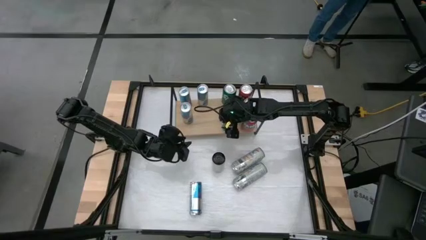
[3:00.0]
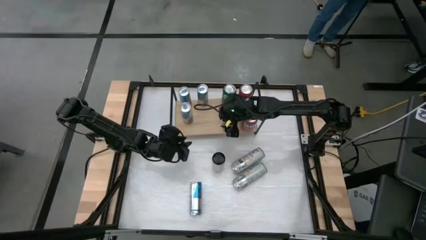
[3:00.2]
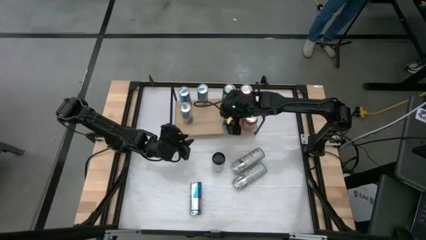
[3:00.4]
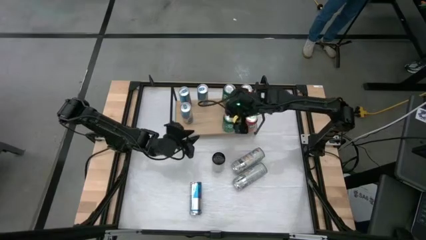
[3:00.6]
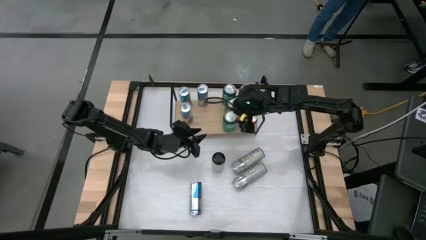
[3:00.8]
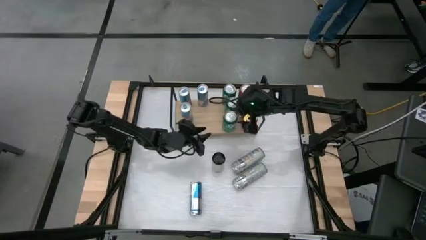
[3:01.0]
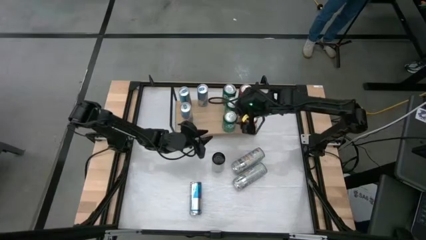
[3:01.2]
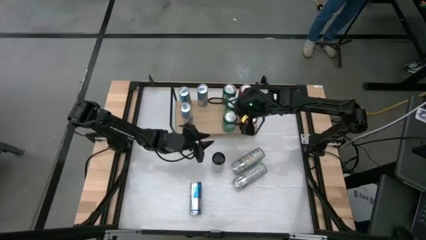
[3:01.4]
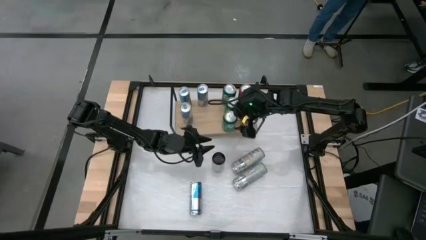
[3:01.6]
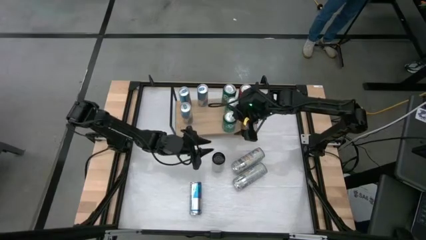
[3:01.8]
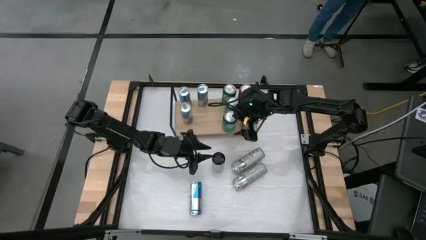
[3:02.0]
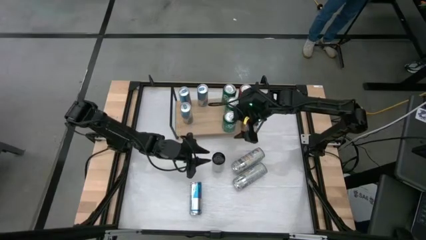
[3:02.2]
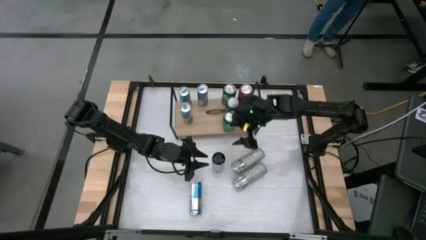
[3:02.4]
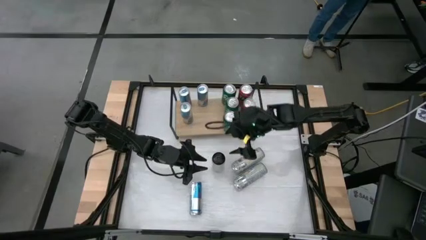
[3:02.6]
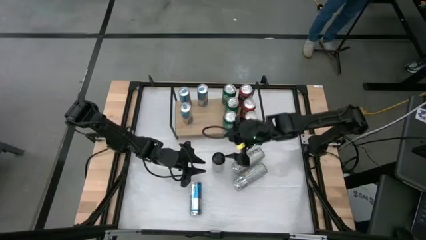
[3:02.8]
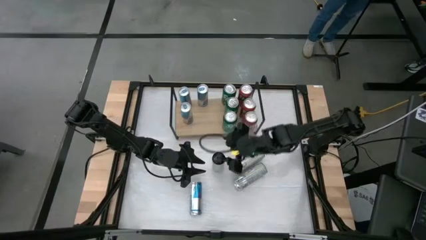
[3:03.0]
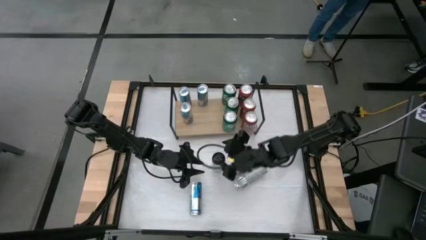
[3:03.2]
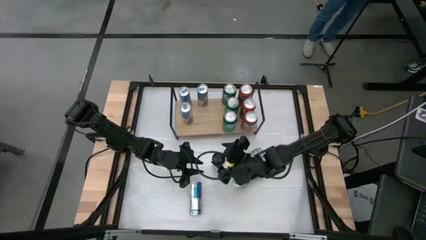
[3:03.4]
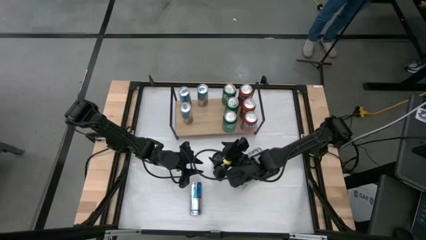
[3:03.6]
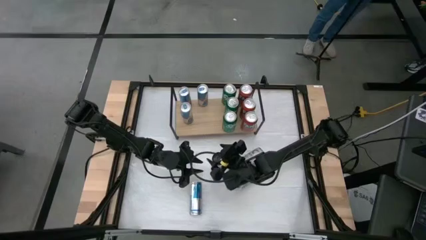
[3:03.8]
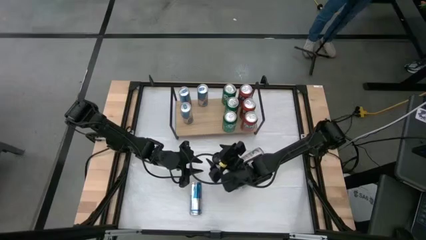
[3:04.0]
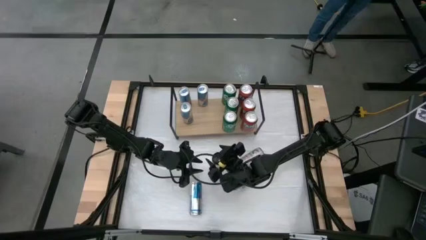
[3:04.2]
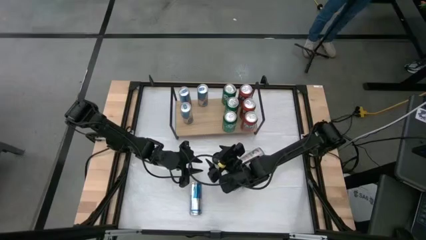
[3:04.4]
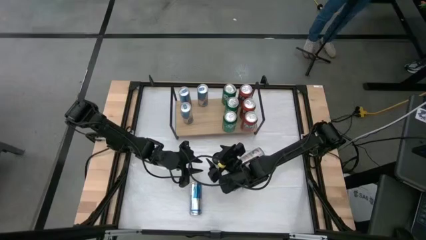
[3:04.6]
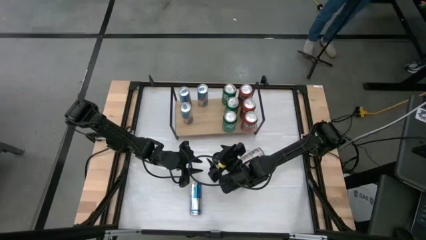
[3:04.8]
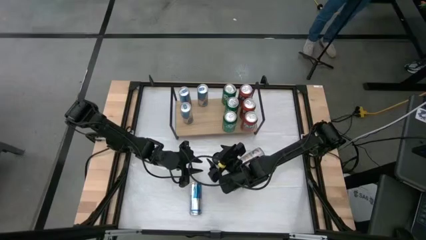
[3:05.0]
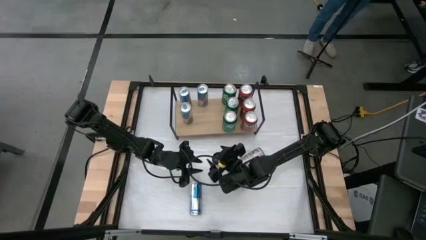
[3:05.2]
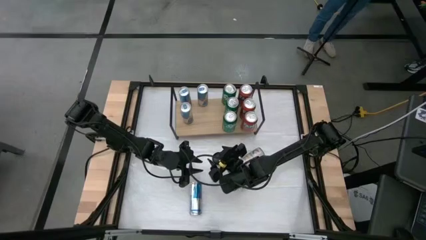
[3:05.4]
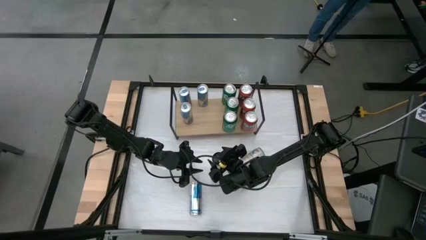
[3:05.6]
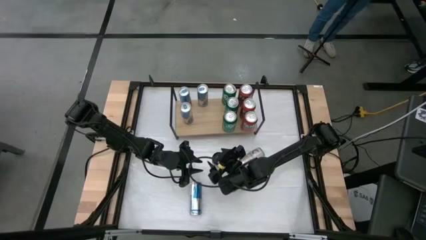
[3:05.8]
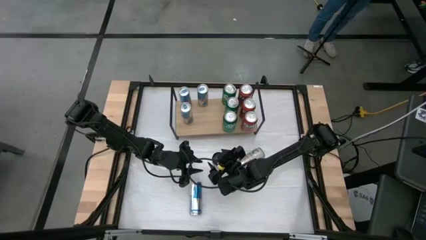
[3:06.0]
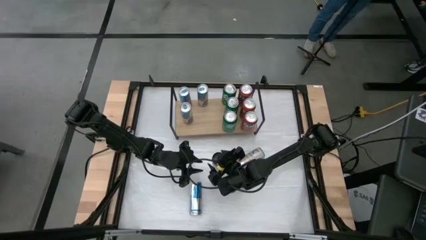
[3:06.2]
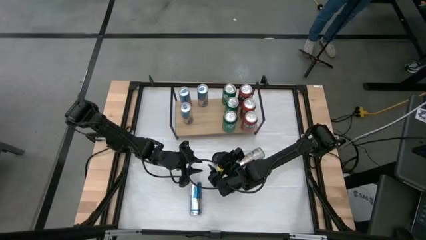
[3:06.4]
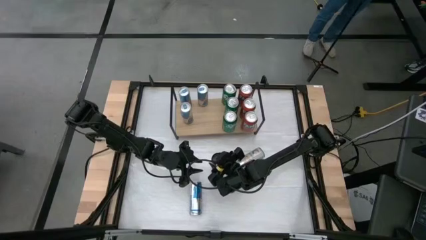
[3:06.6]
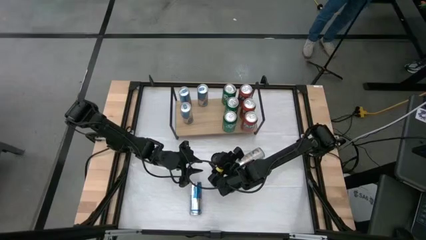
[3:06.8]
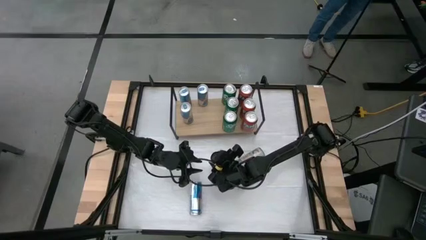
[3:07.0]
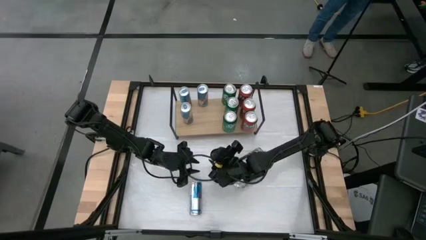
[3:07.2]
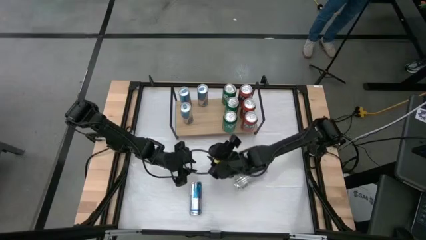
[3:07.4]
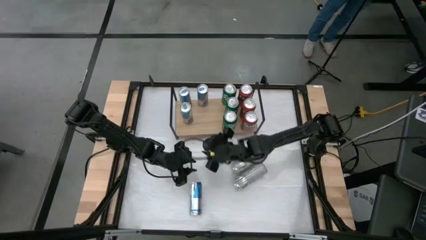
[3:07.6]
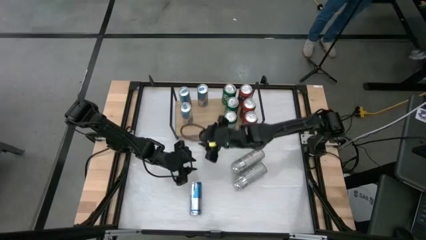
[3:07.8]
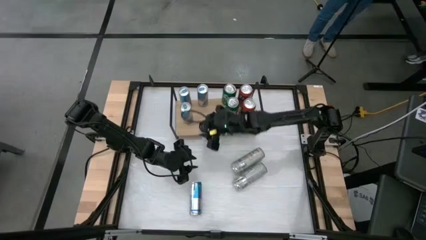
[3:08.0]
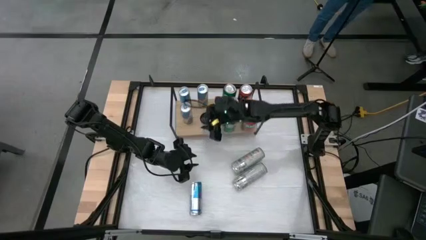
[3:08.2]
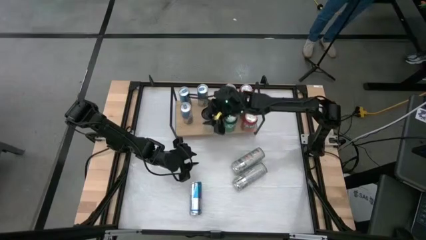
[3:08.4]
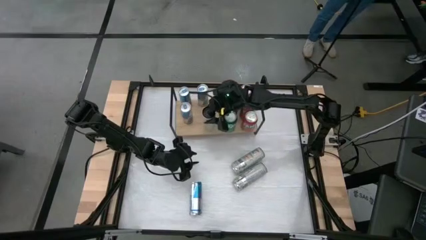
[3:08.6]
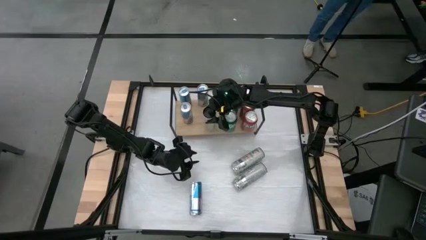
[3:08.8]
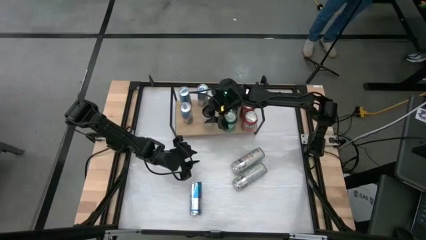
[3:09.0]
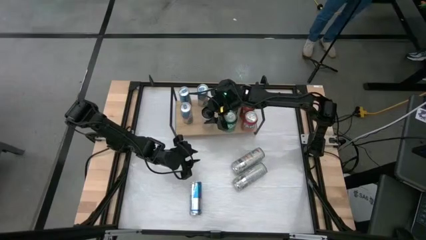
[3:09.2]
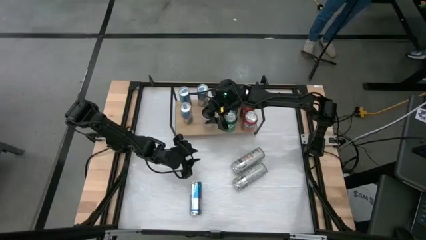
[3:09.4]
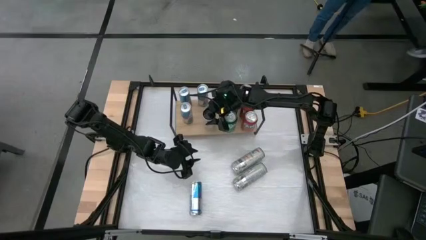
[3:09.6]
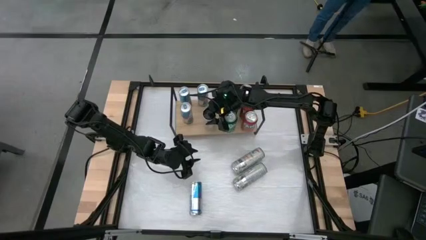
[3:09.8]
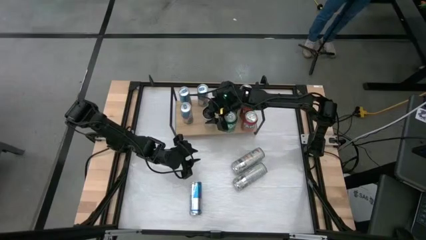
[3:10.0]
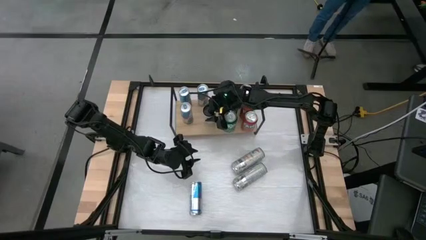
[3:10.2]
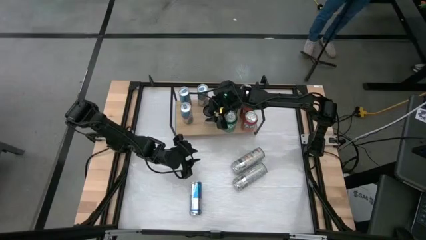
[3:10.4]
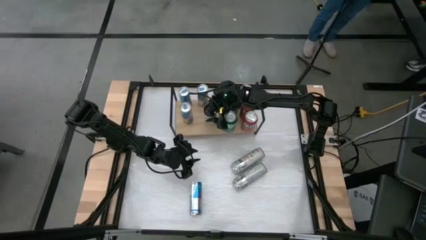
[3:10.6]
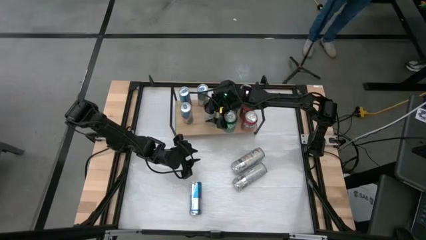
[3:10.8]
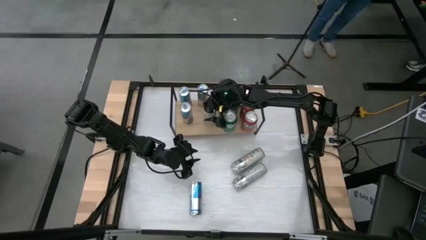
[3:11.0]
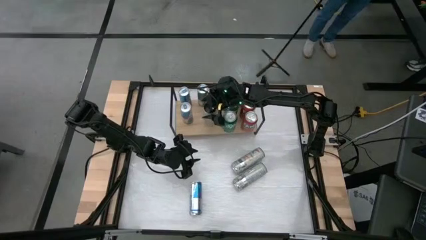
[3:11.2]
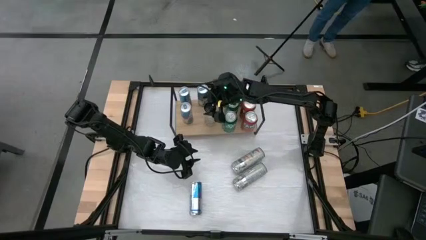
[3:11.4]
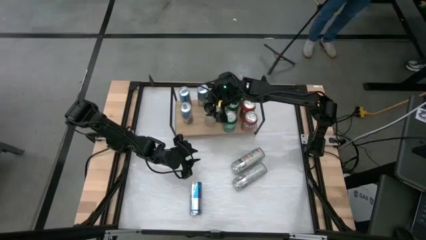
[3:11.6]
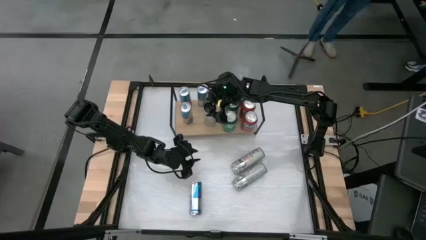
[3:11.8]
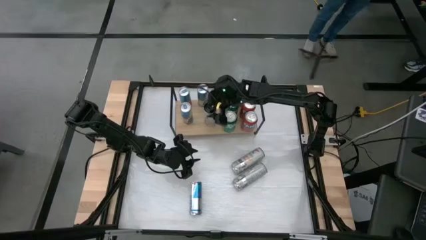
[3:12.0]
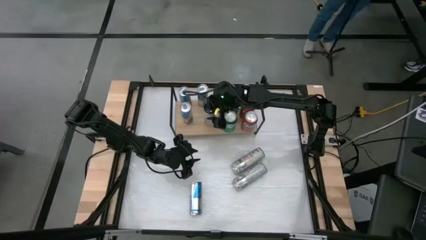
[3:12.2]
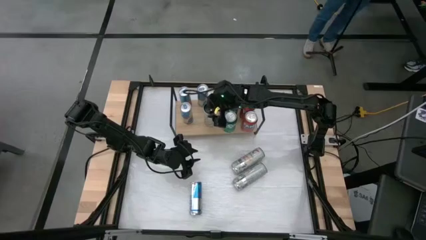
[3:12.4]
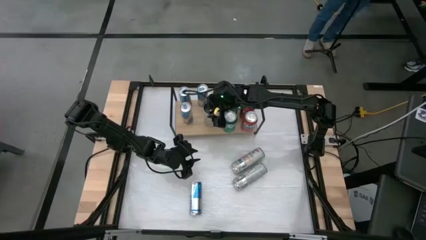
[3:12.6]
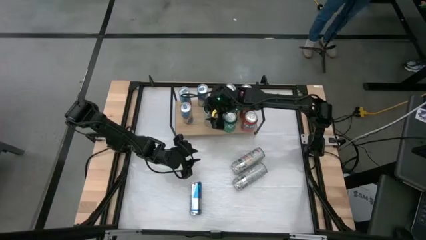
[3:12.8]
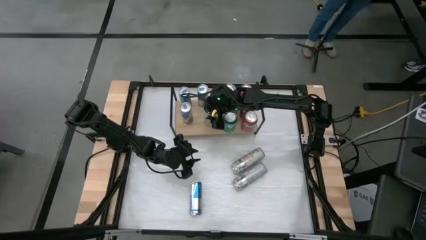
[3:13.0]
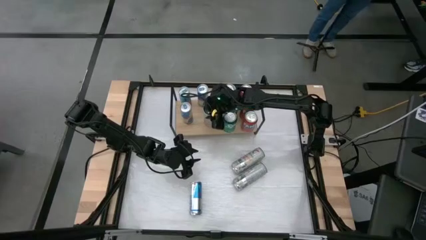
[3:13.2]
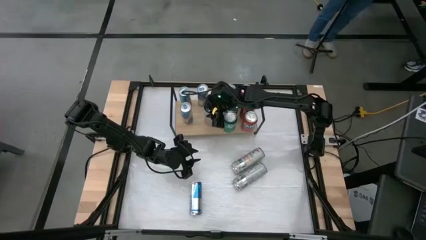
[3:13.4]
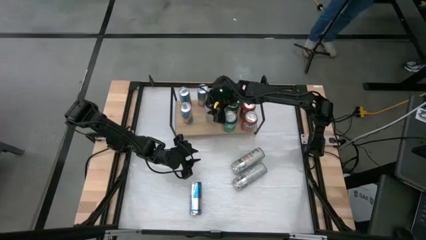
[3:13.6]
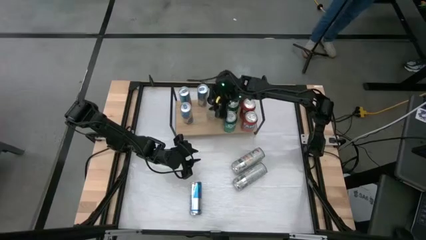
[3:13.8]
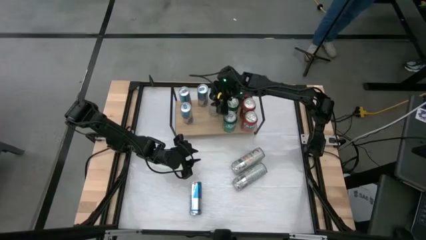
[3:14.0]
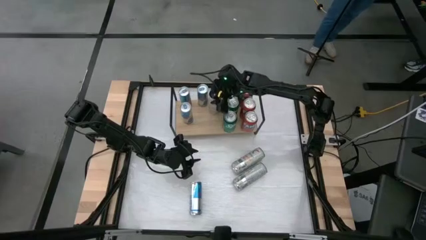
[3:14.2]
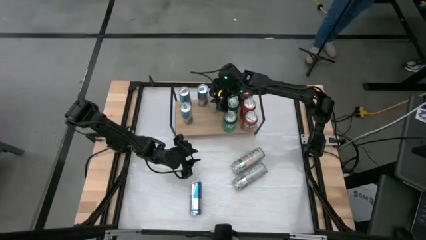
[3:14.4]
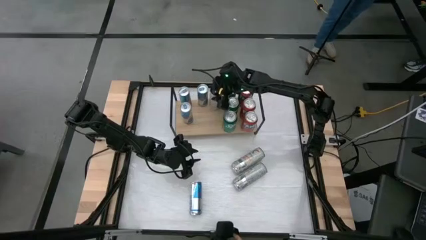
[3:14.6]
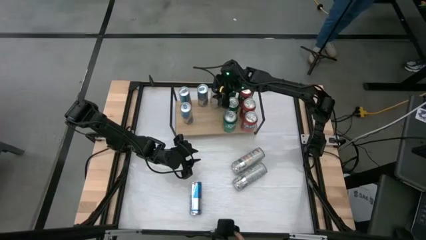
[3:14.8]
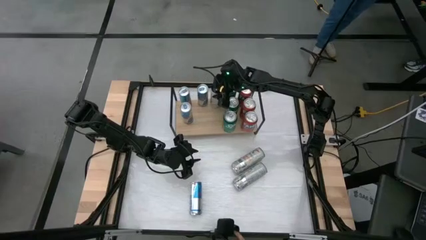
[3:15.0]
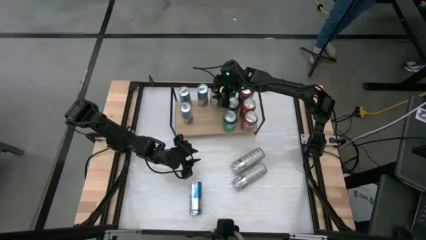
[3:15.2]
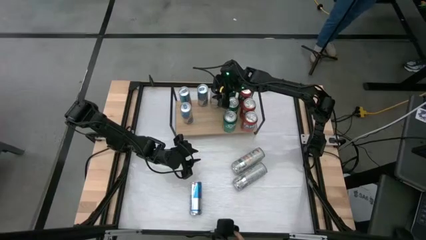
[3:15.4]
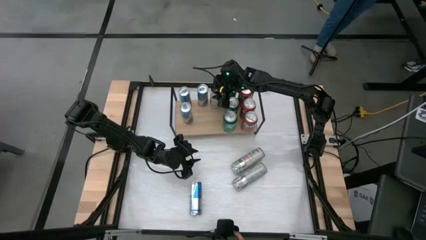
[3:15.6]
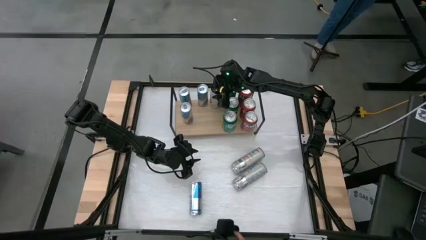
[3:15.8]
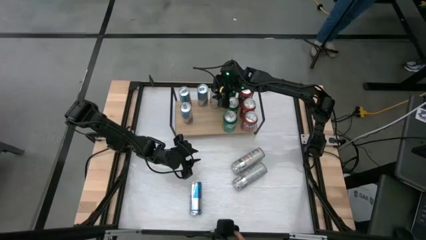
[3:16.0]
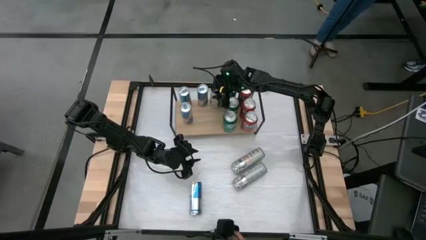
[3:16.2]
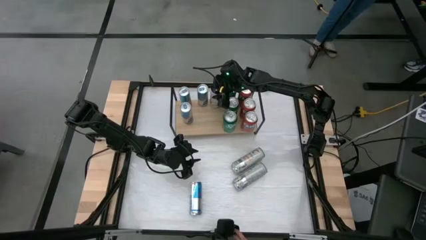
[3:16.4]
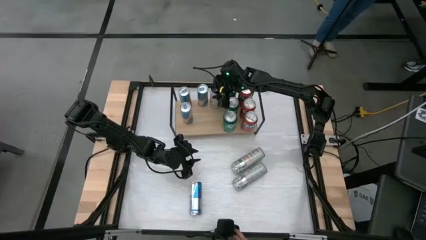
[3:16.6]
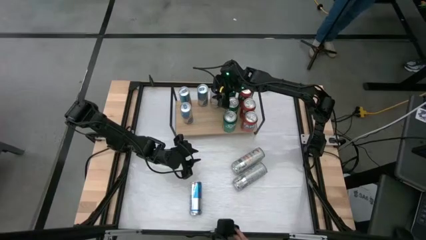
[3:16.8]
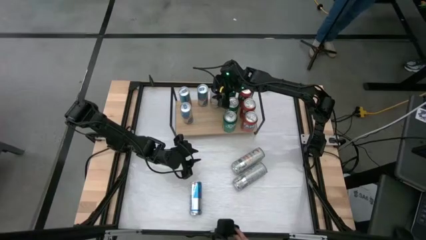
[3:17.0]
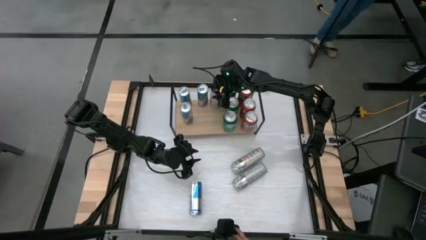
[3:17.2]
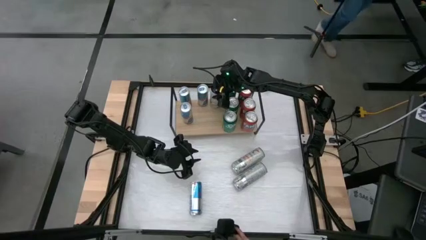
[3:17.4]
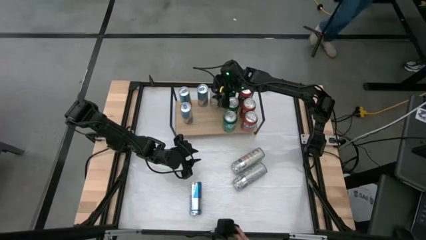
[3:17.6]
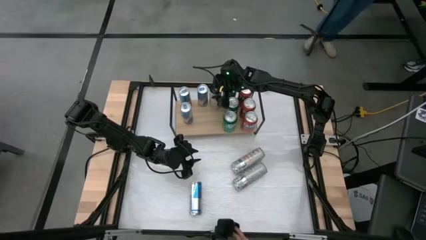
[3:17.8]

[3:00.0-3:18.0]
Task: Sort soda cans
Put the white-yellow soda can on the shelf
